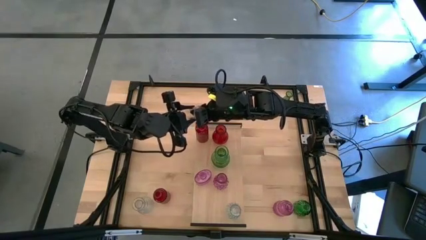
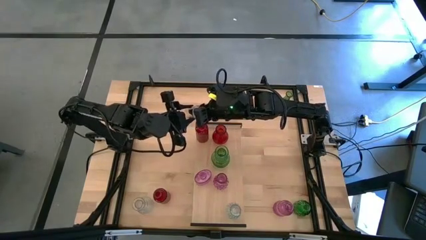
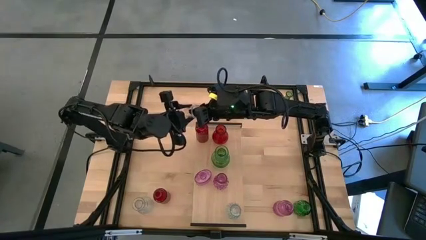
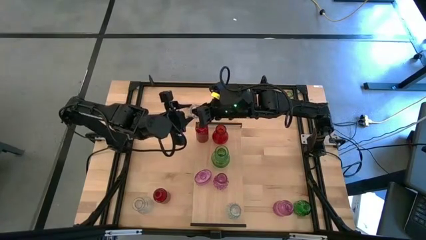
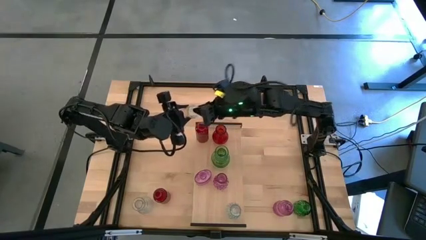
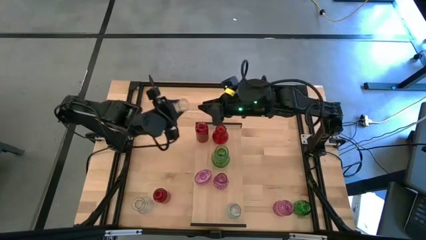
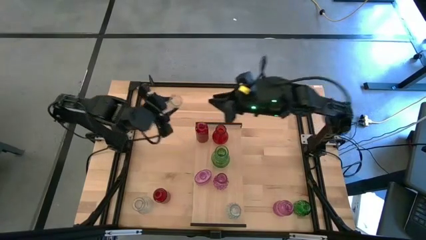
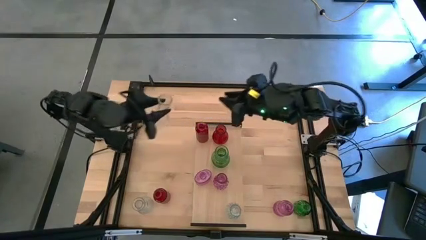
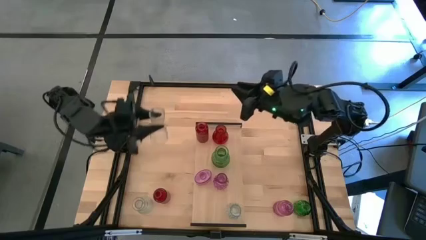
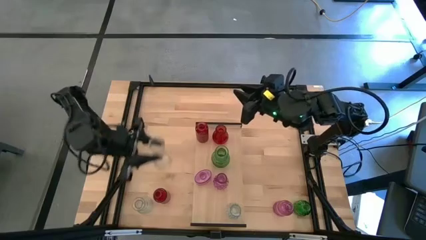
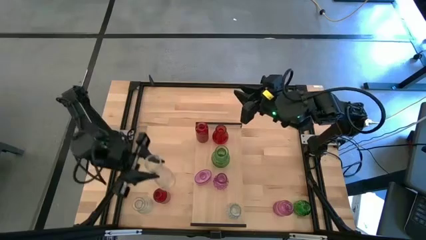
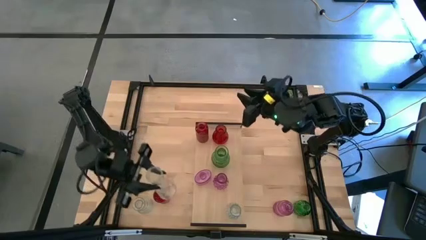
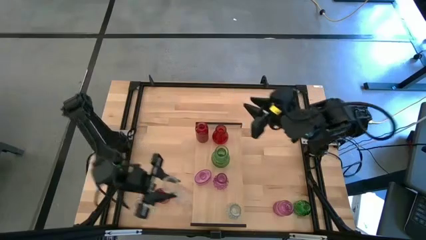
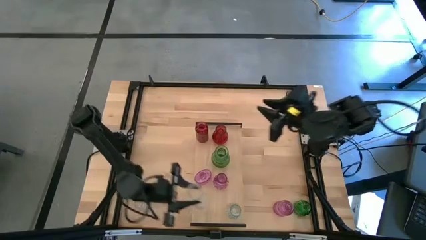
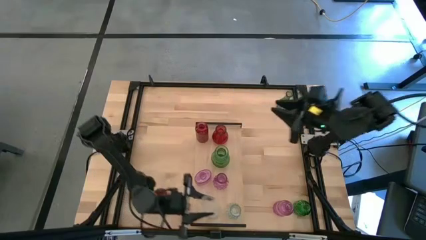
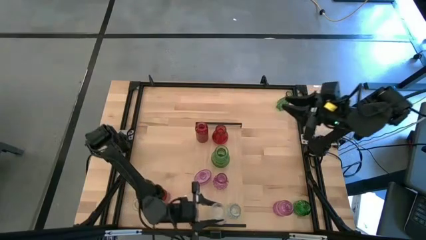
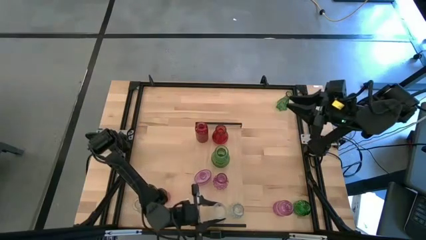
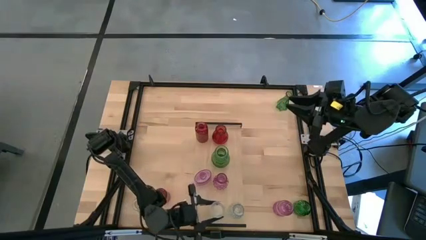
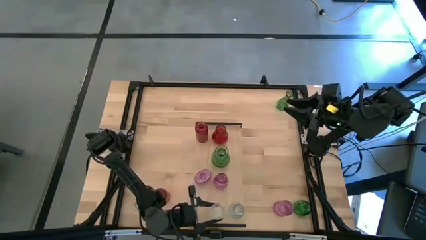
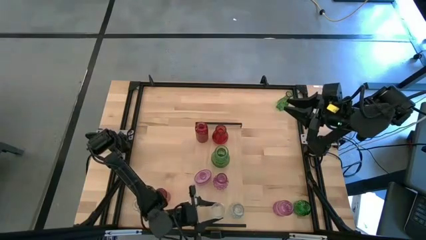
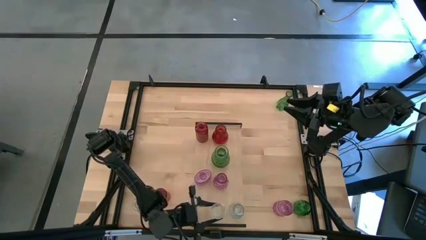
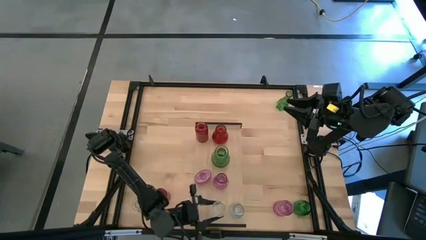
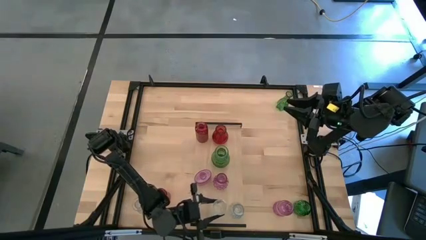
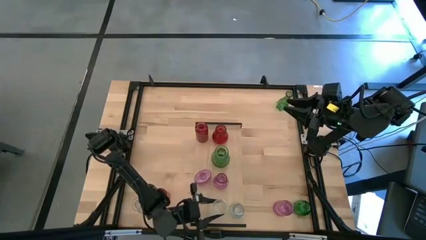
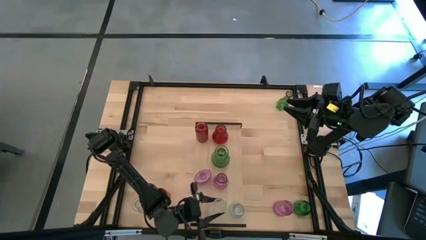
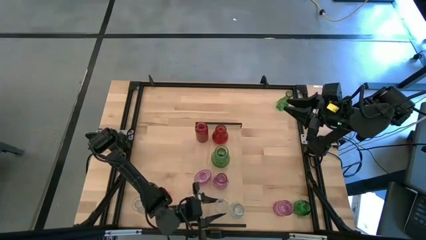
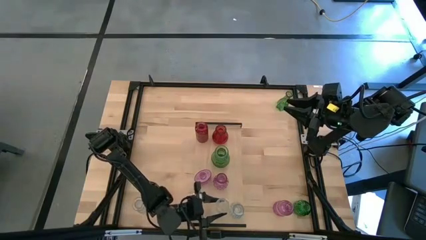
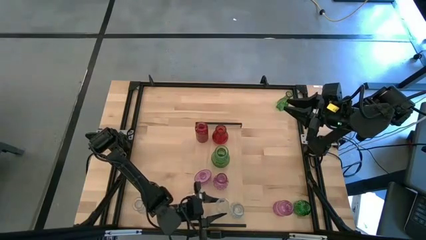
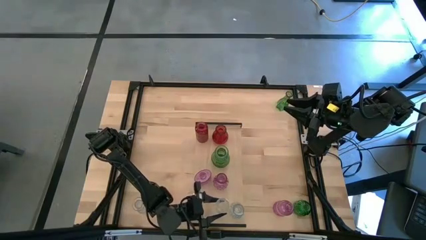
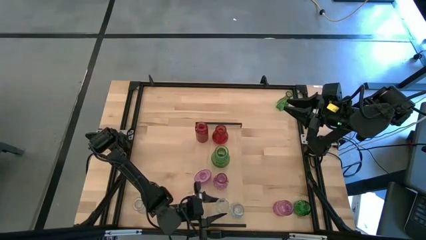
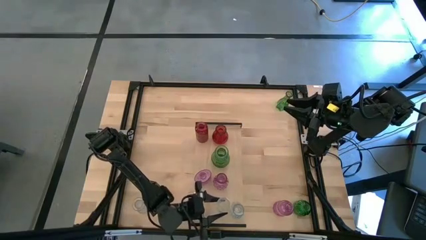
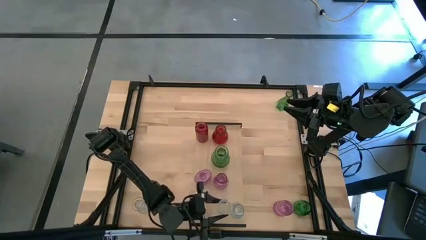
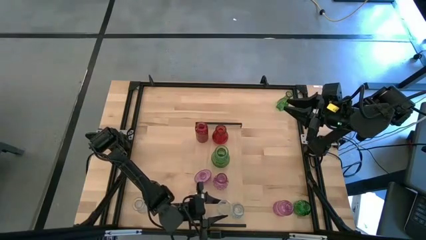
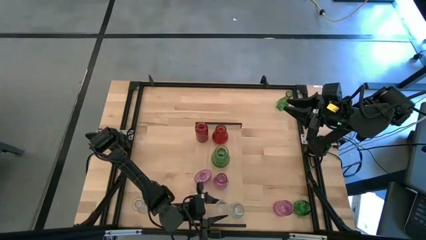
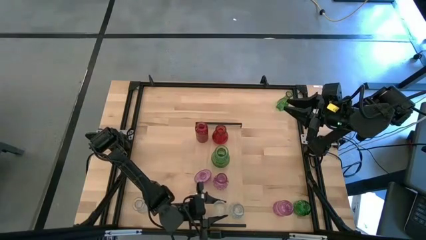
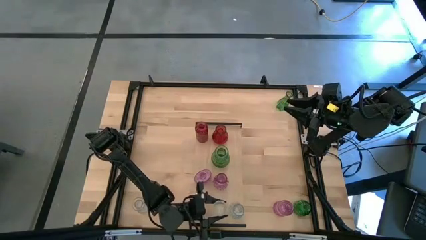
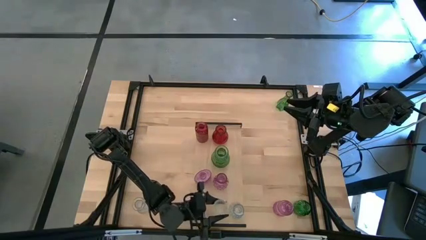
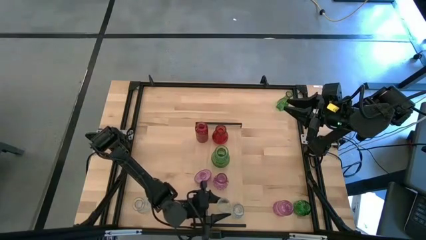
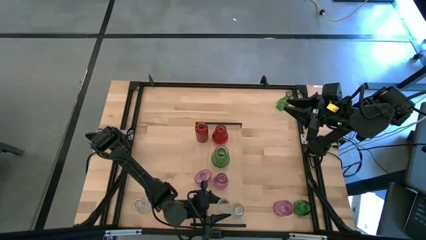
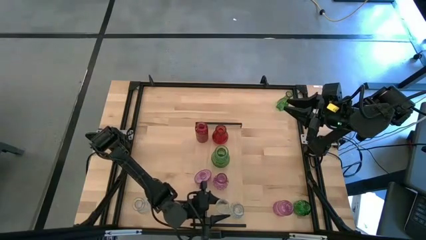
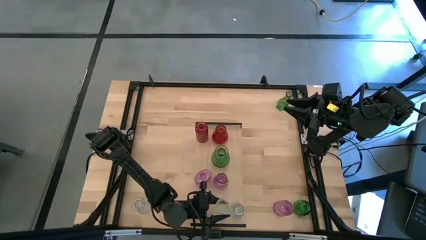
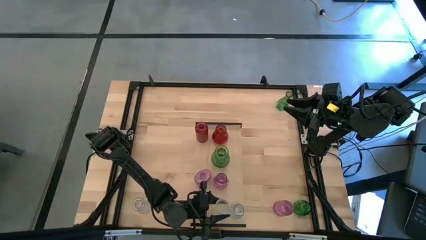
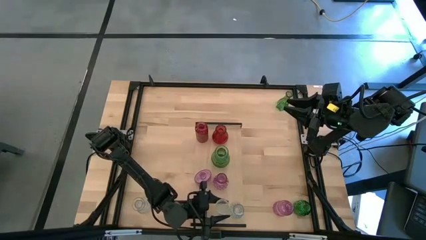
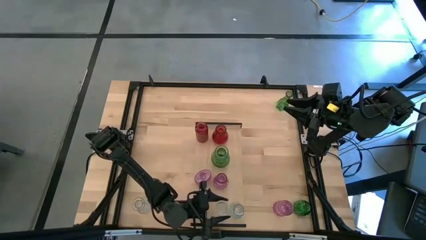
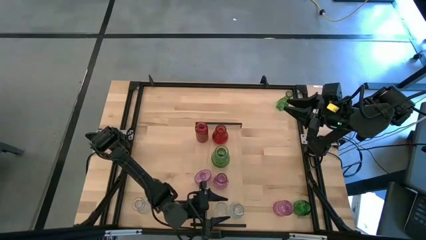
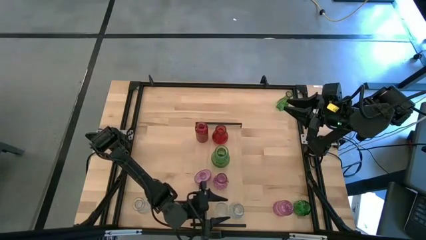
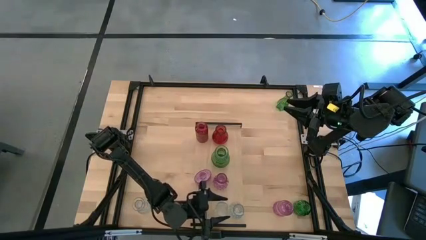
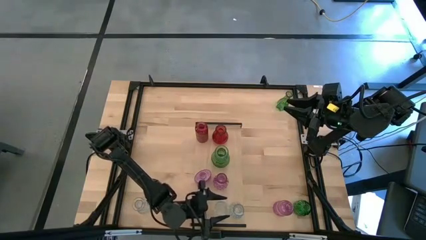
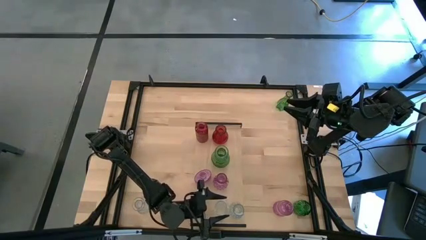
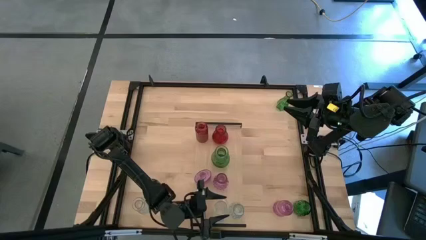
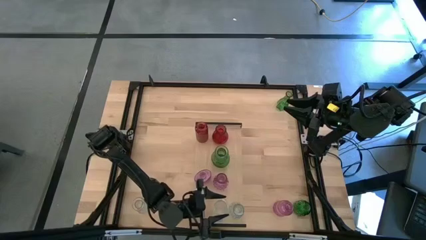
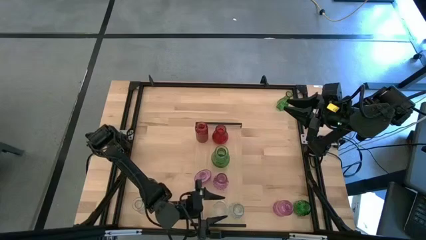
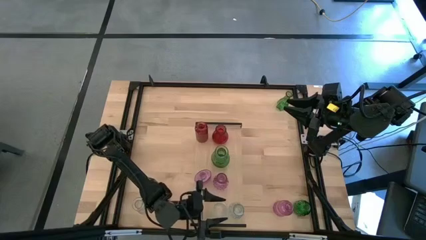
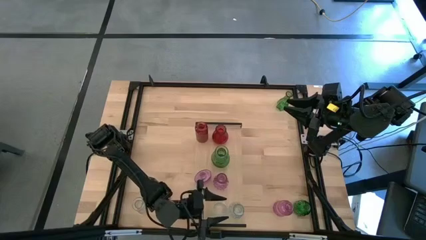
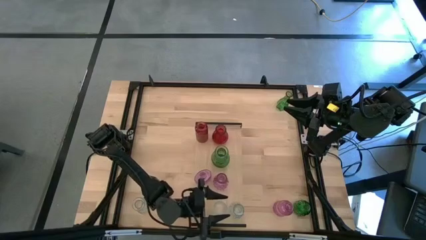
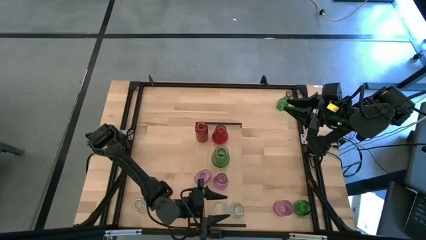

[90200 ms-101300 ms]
Task: sort vases onto shelf
Put the top white vase on the shelf aligned with the other white vase

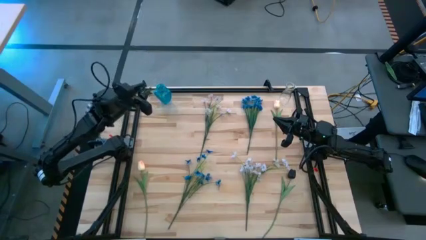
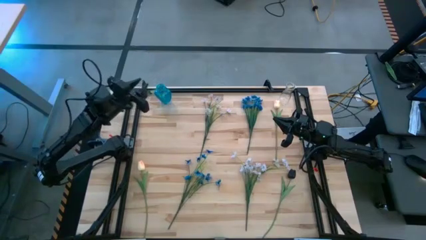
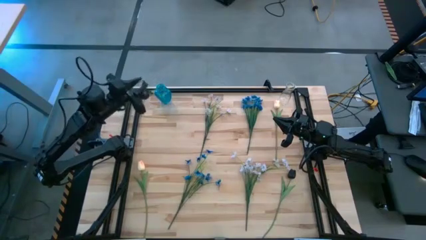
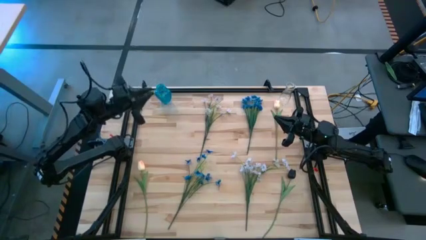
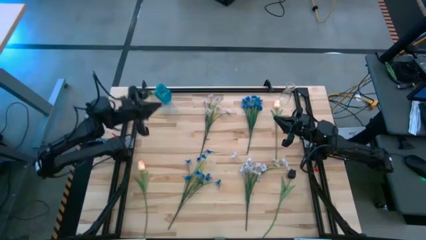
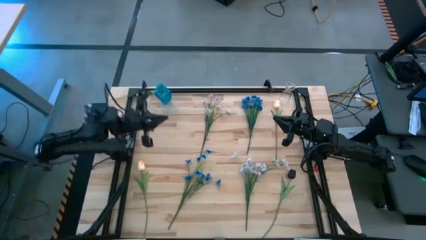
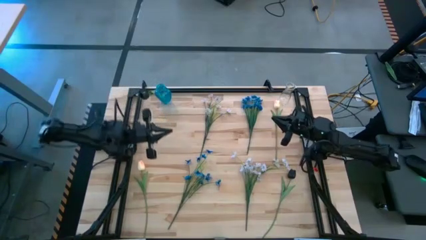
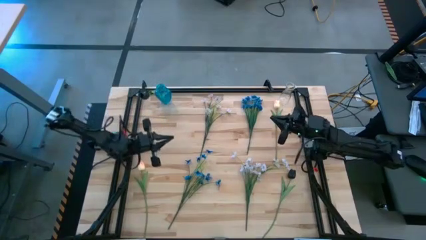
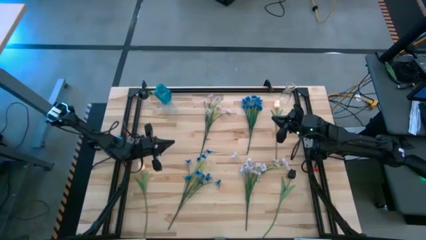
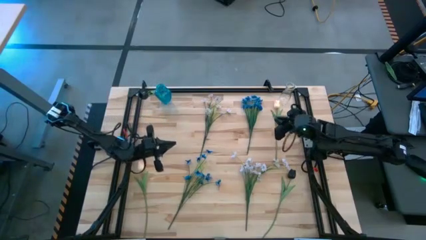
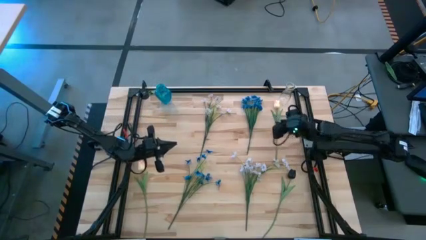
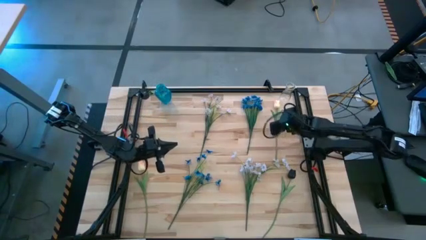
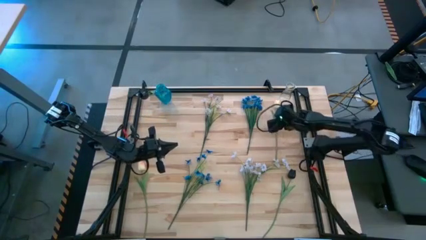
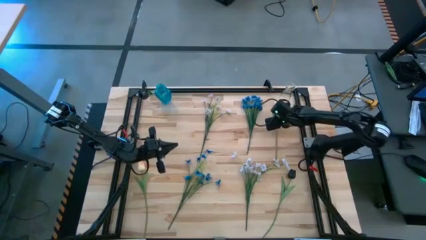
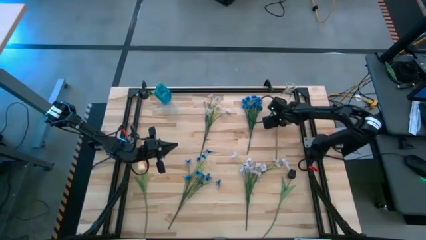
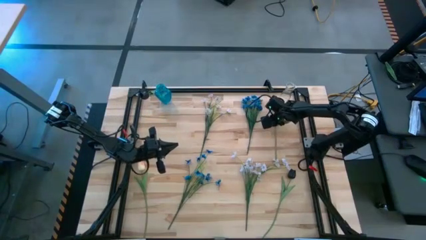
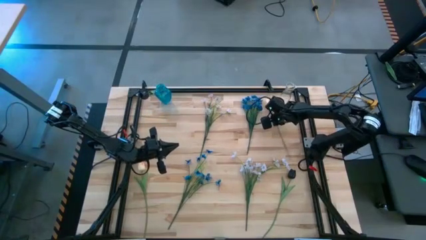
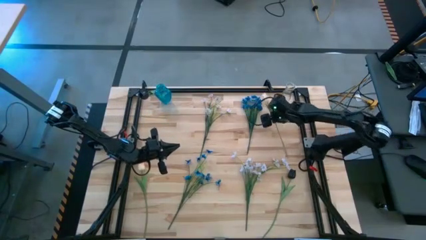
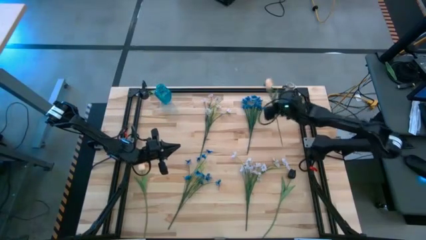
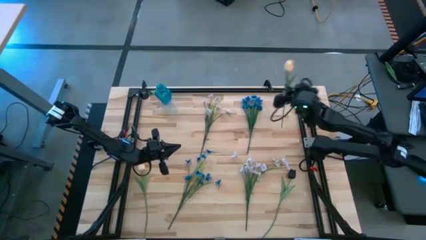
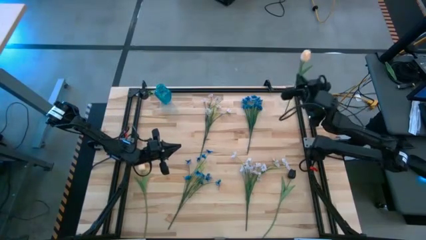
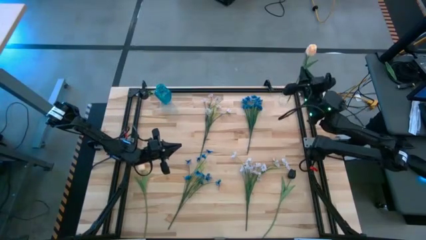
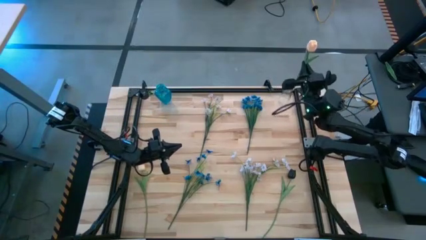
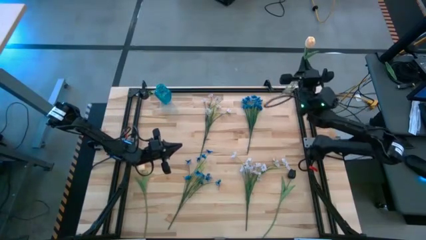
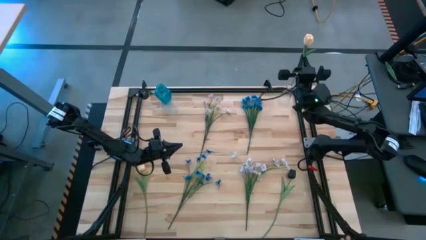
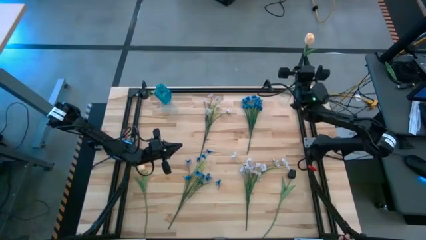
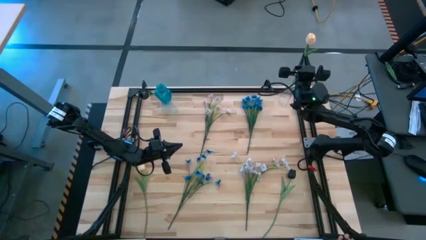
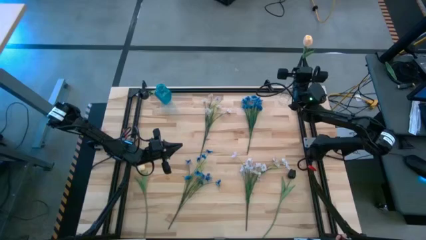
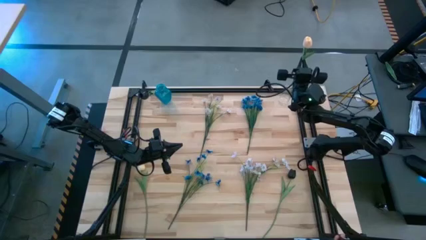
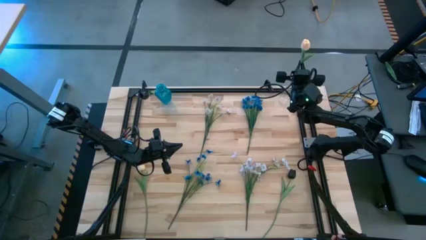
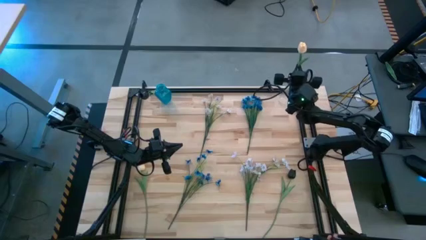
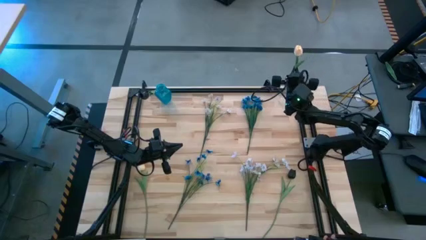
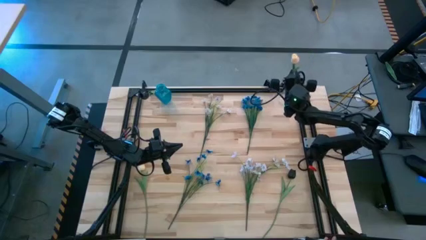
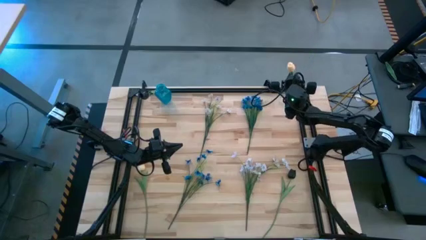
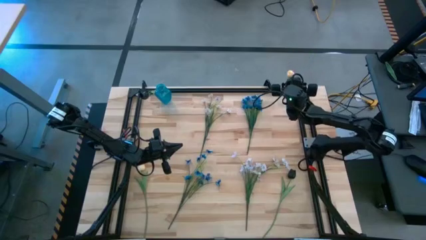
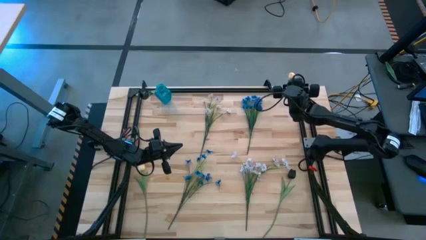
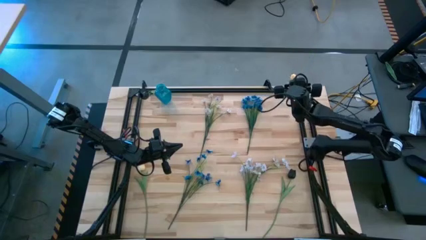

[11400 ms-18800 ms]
Task: Sort flowers into vase by color
Put the top yellow tulip into the transparent vase
